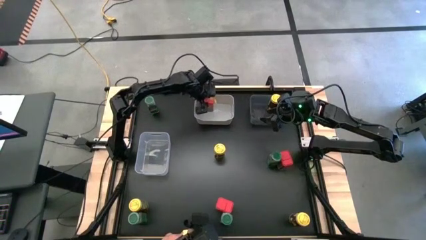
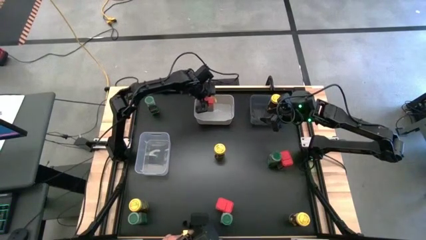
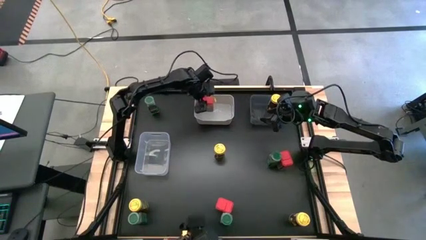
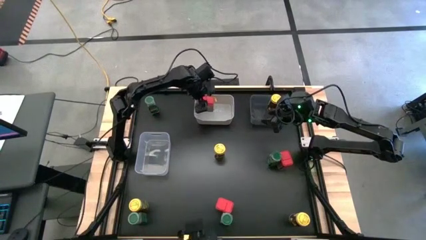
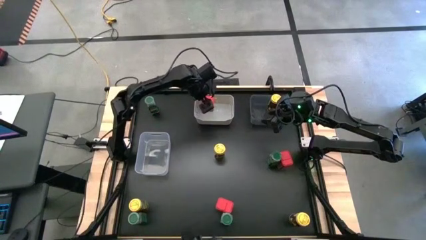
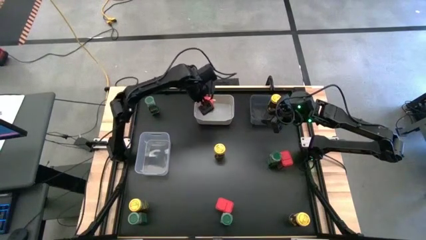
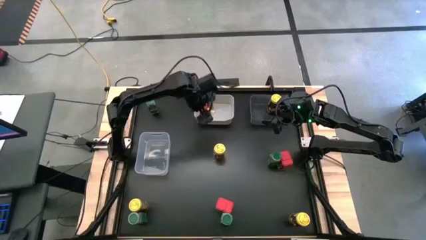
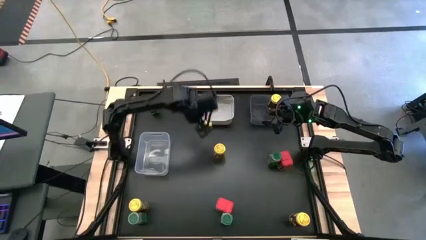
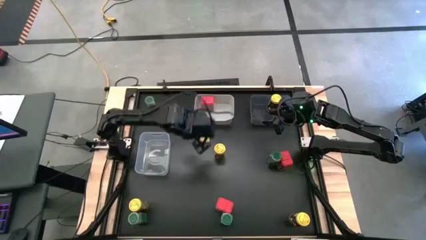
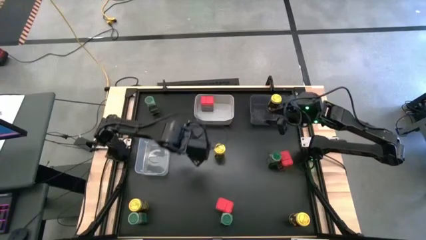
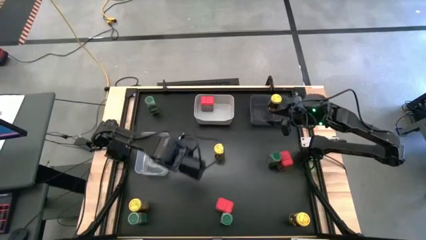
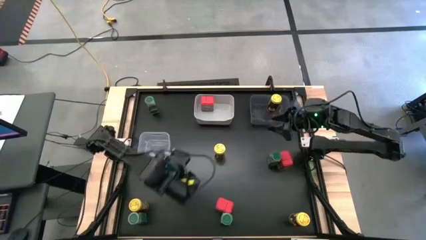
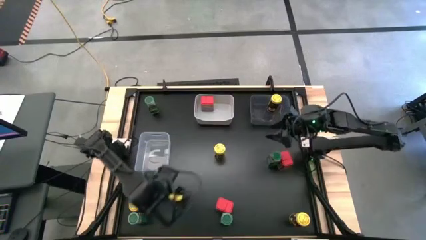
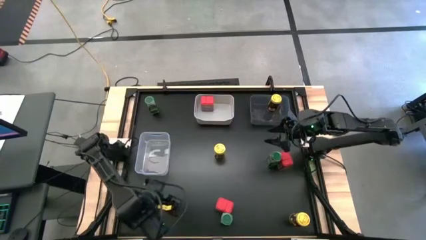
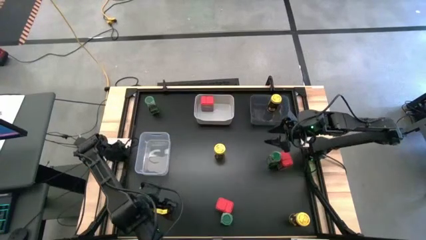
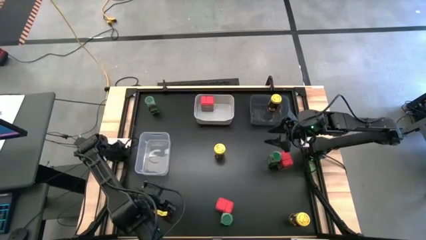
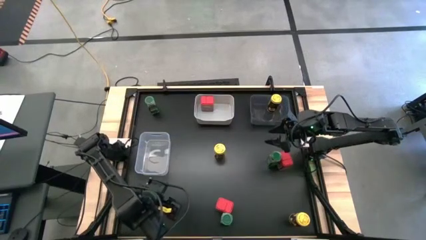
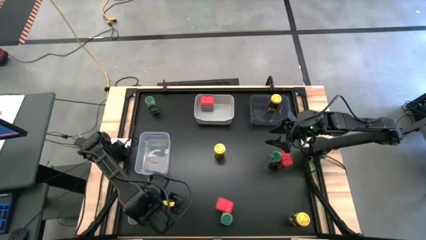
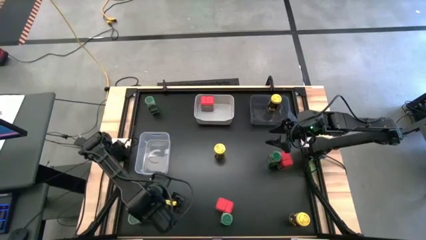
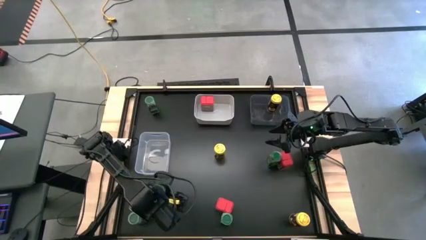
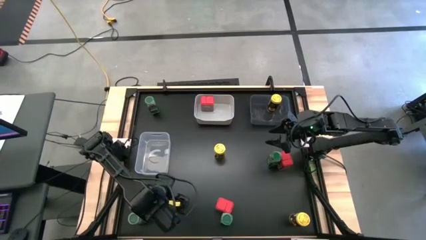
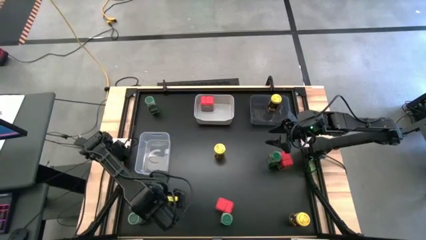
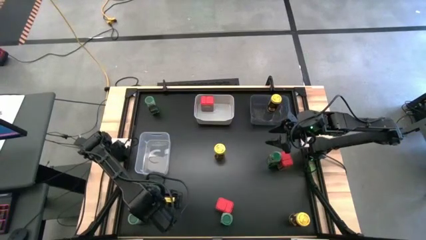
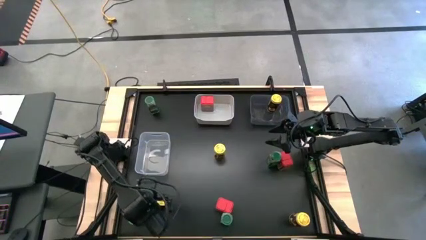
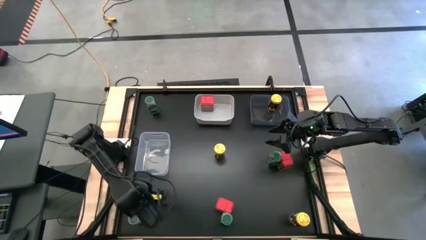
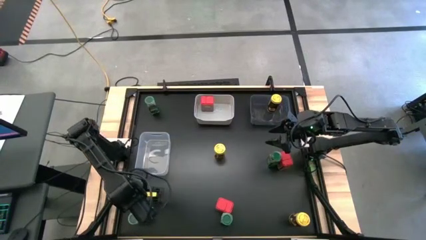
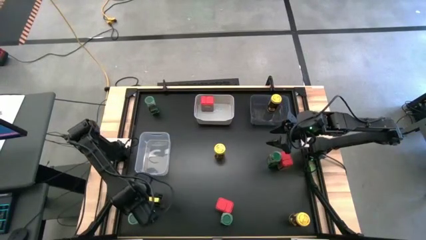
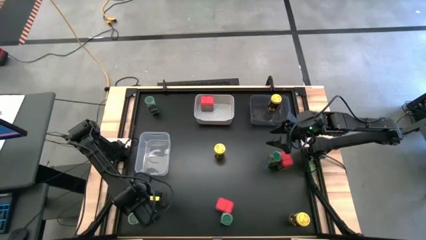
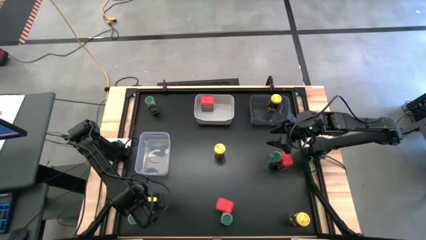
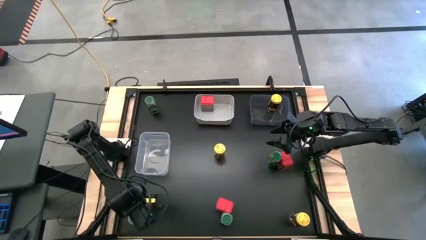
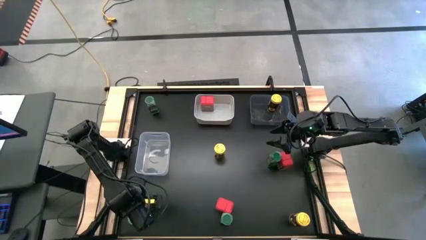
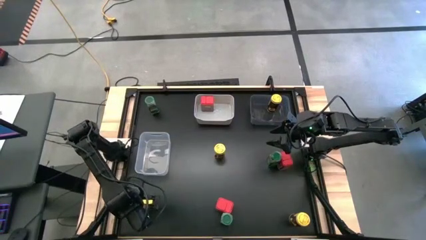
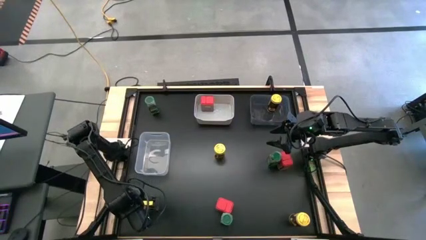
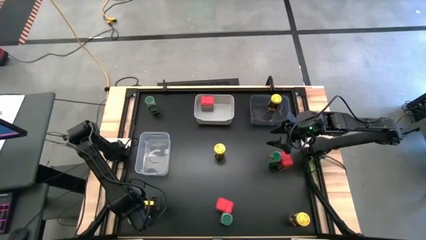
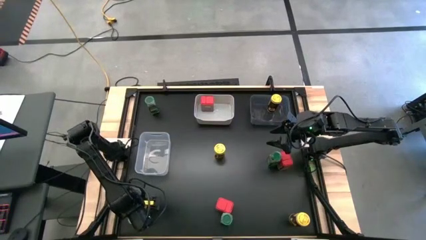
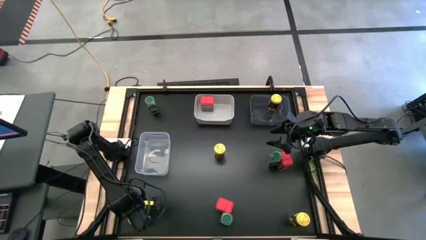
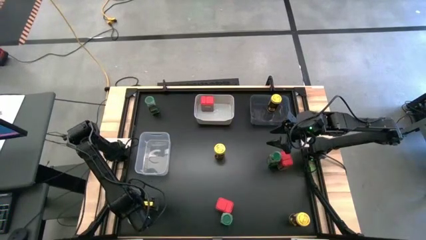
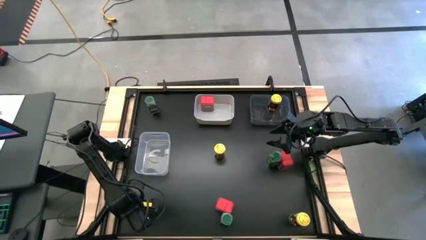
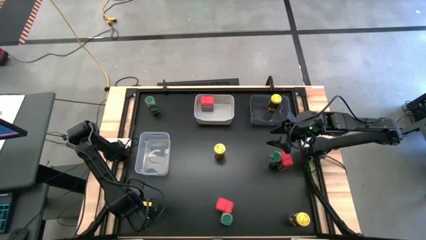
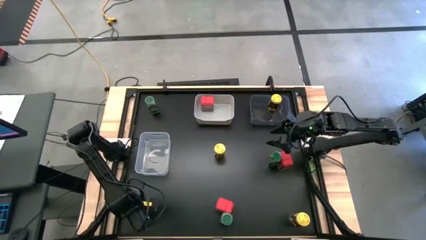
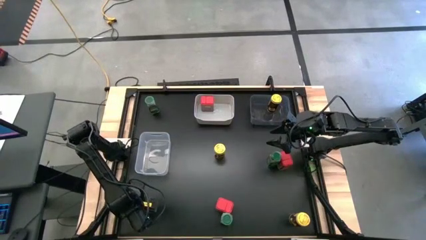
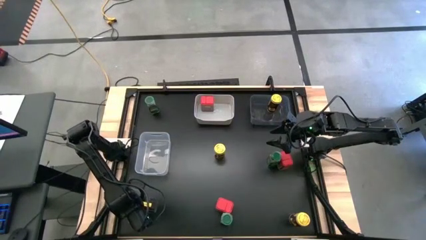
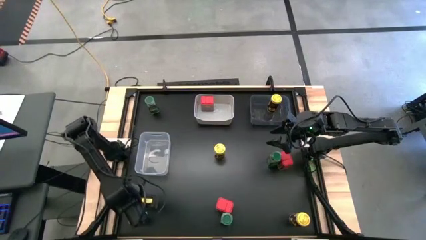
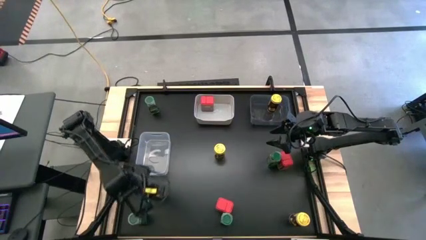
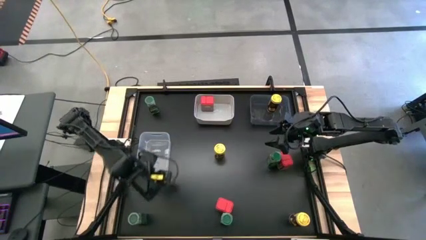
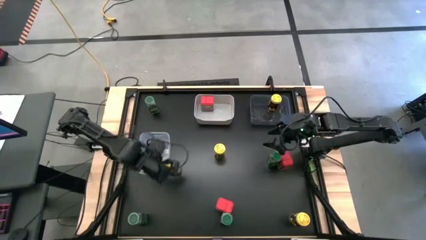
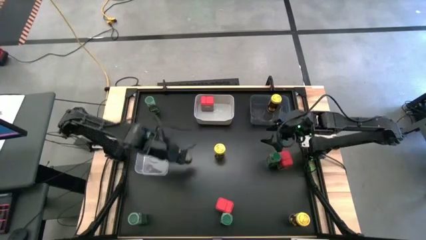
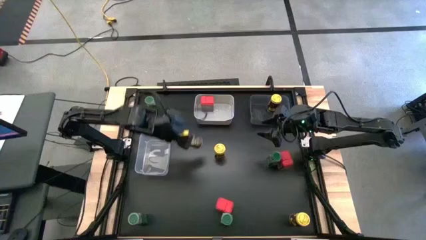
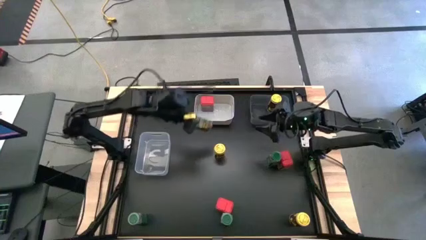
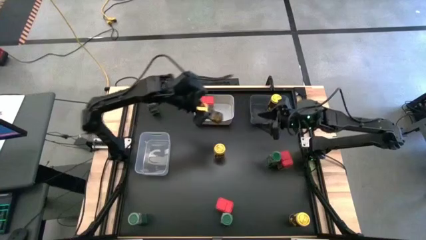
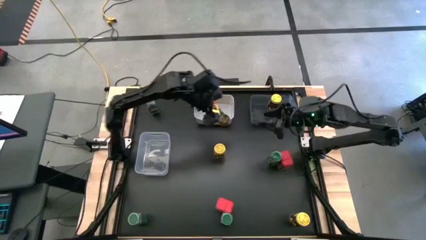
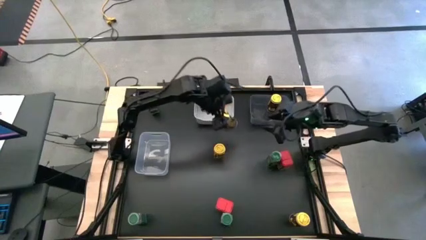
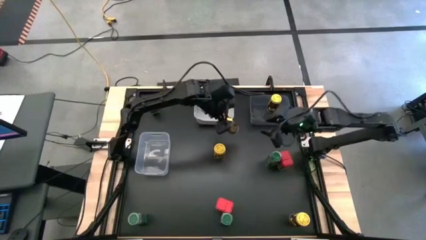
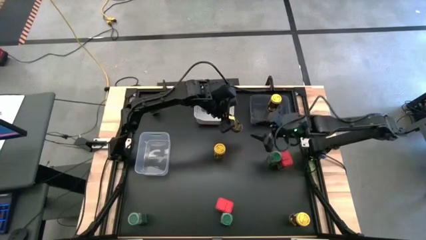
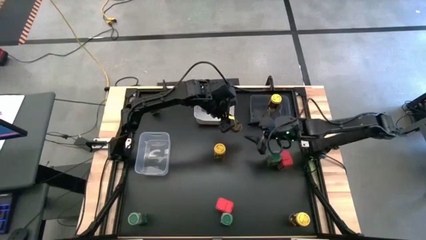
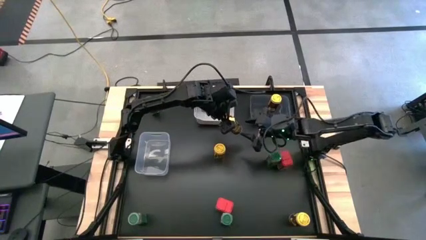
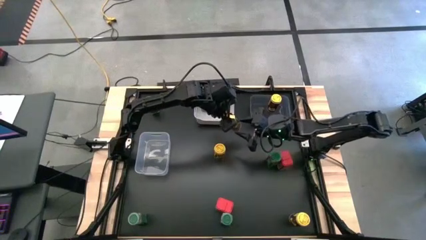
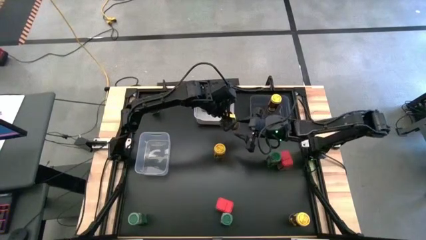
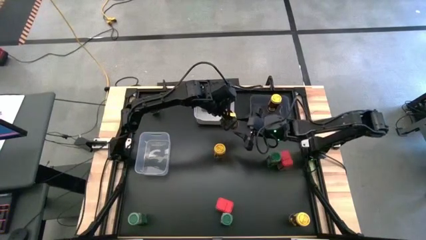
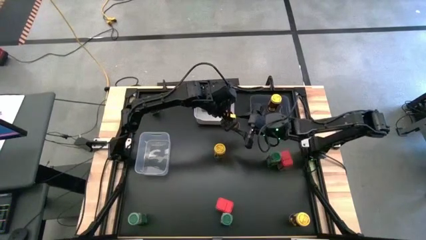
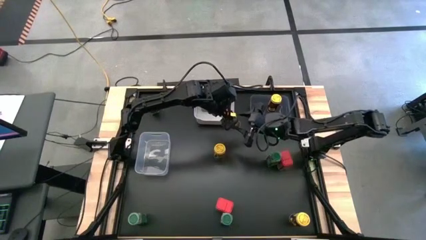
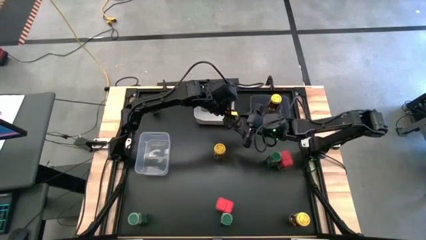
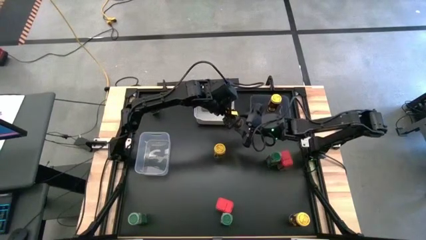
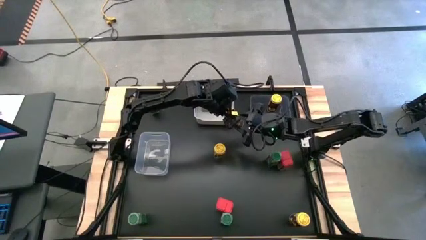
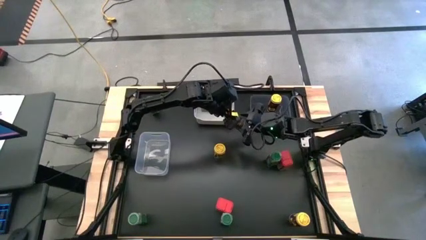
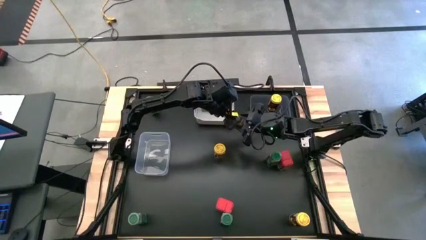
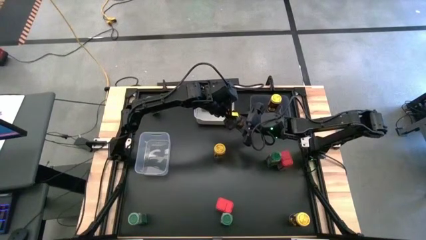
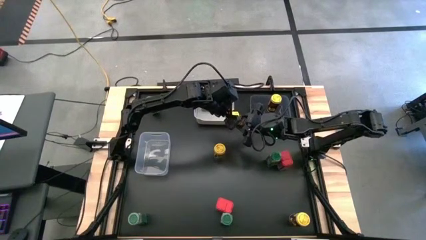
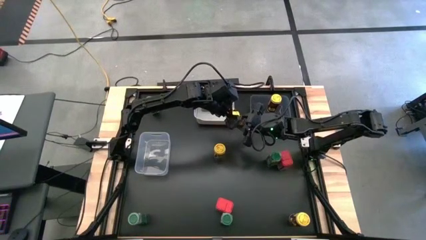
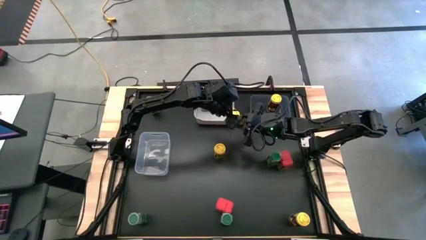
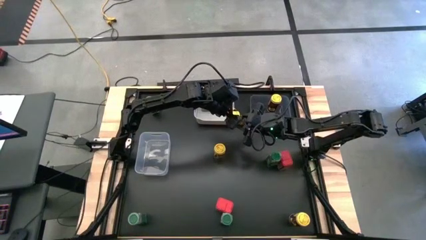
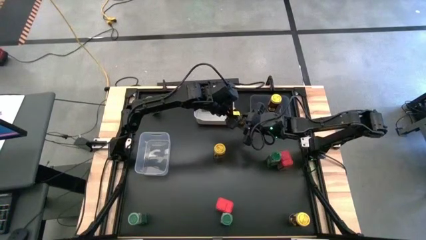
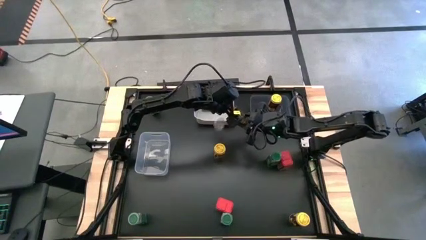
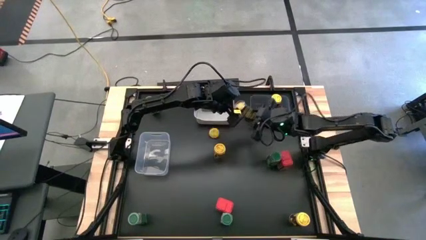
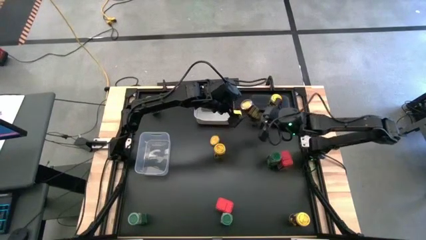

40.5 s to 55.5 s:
Task: Sort spices by type
Put the bottom left yellow seasoning bottle into the black bin

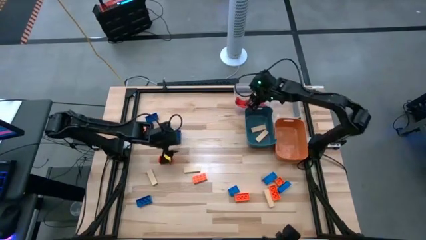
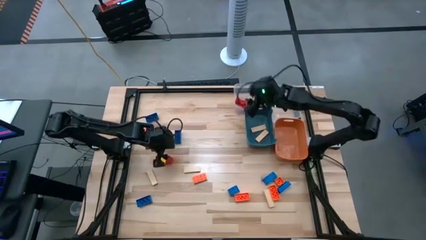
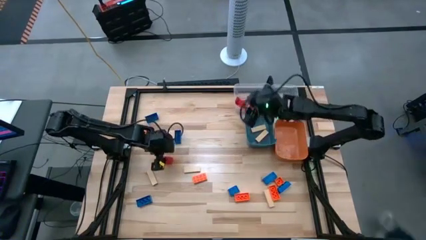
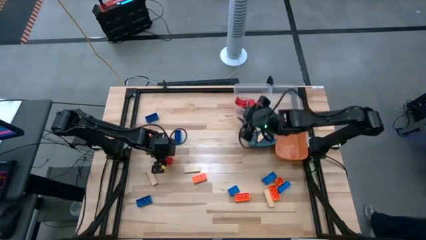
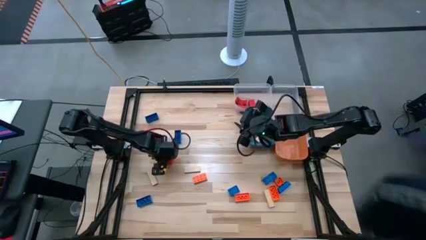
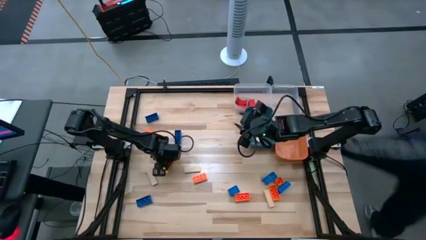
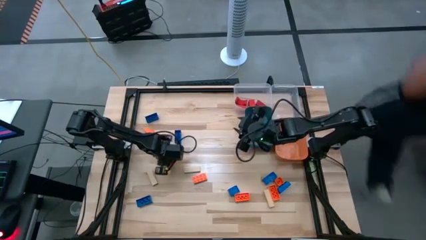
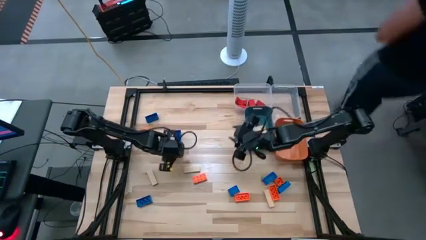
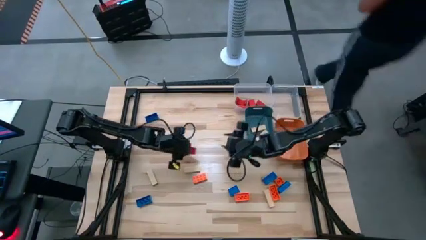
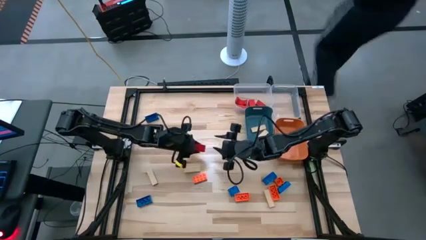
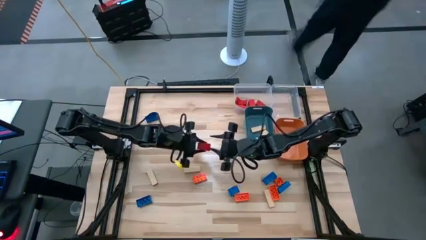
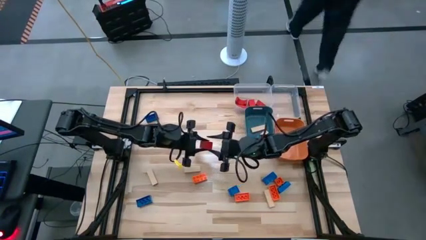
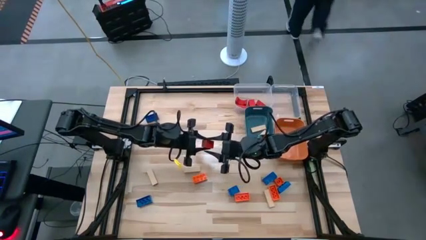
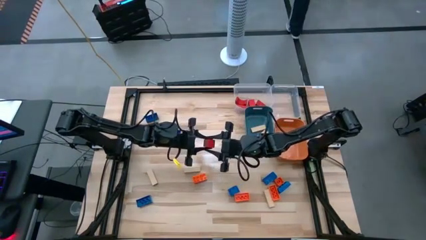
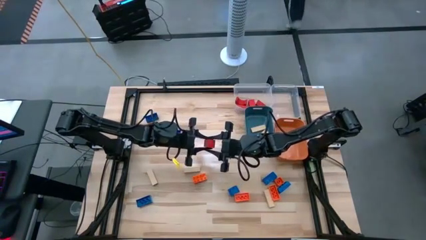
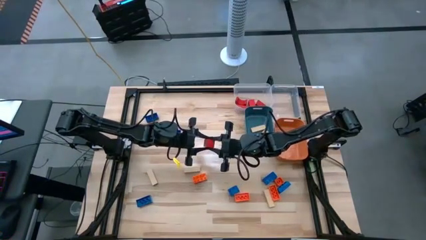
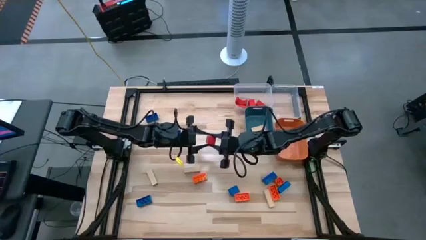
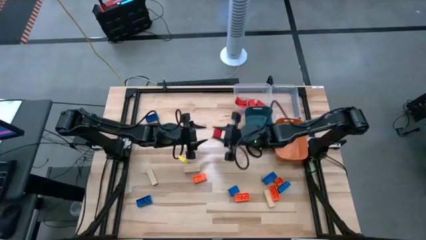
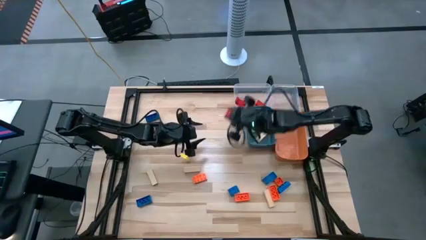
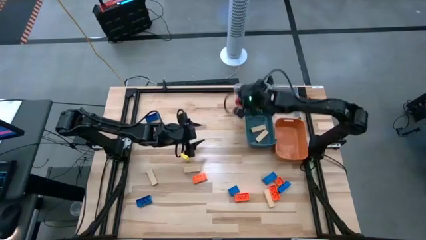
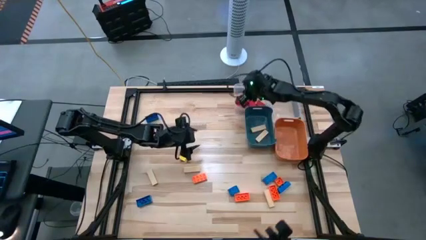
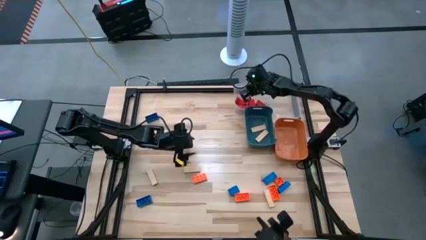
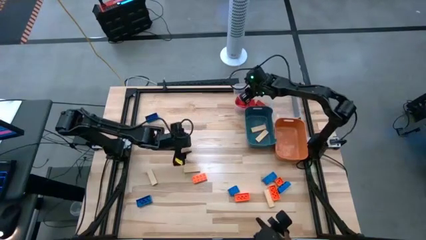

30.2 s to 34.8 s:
Task: Sort blocks
Put the red block into the left transparent bin
